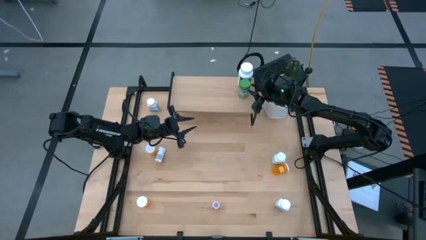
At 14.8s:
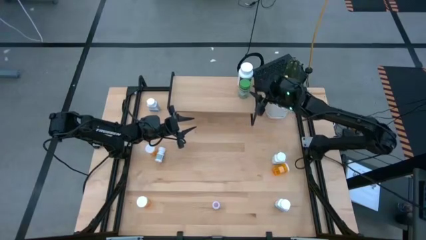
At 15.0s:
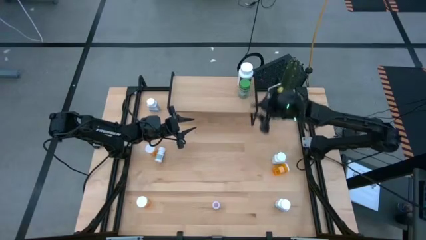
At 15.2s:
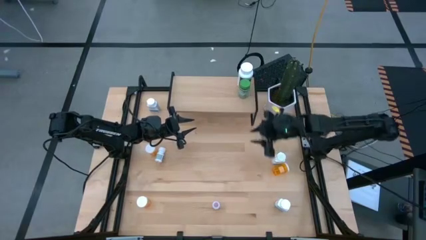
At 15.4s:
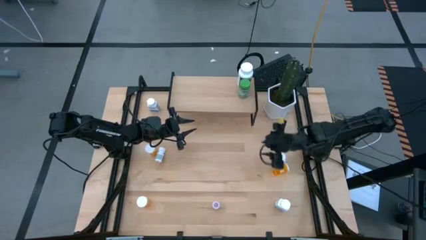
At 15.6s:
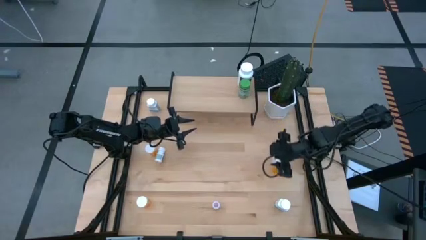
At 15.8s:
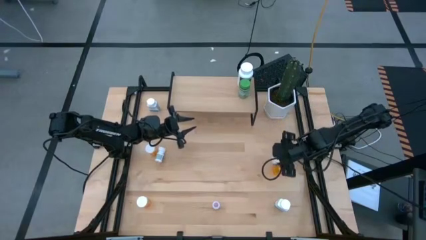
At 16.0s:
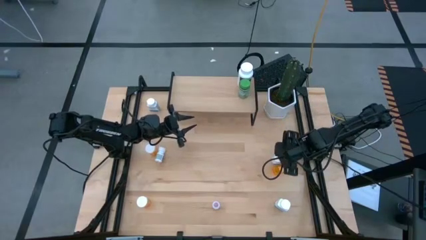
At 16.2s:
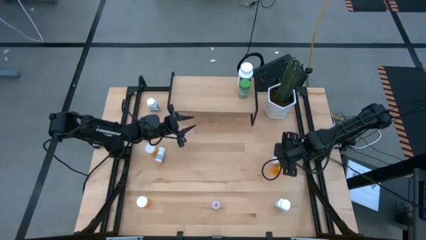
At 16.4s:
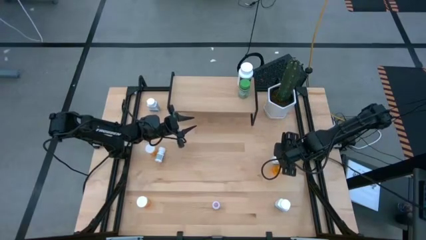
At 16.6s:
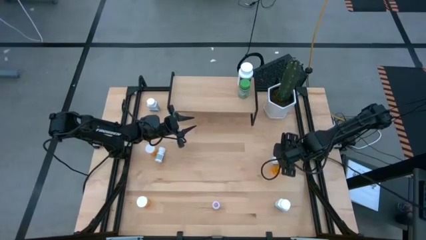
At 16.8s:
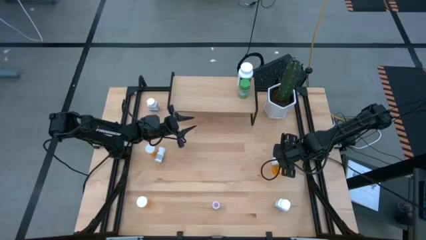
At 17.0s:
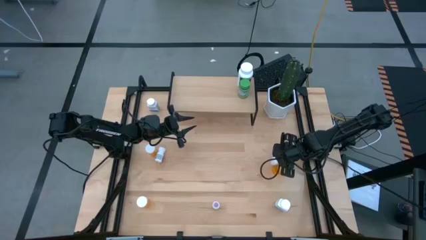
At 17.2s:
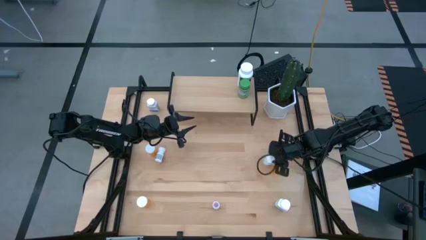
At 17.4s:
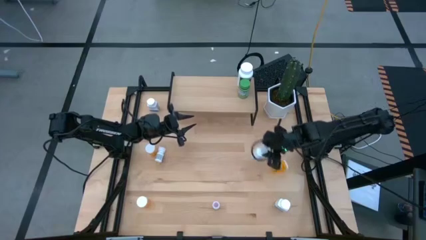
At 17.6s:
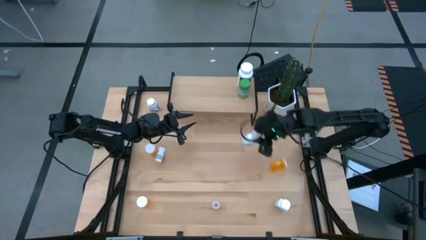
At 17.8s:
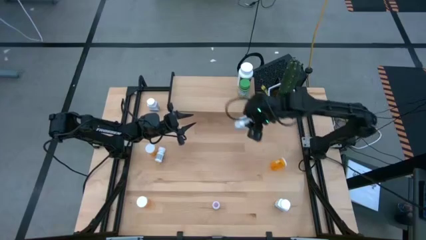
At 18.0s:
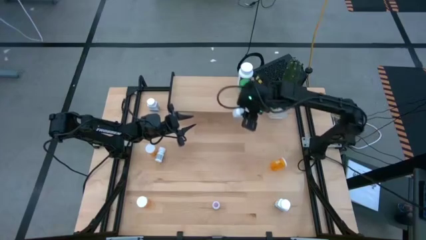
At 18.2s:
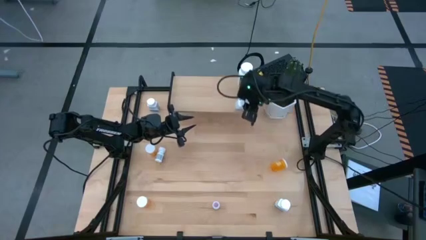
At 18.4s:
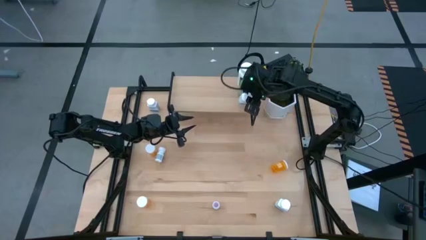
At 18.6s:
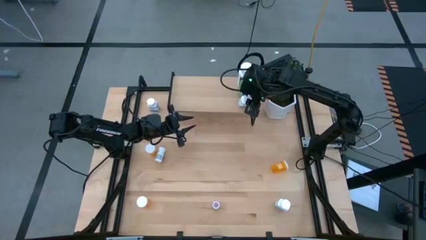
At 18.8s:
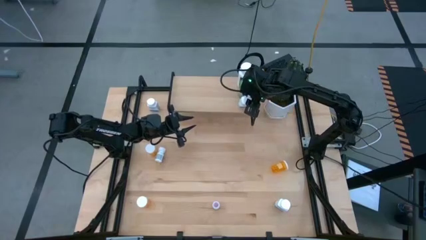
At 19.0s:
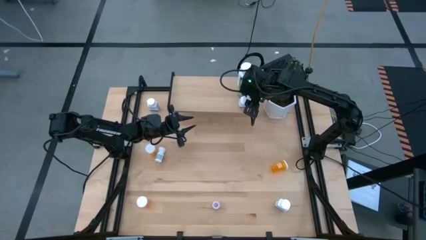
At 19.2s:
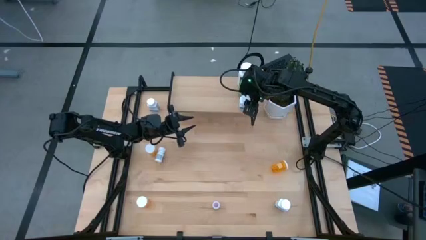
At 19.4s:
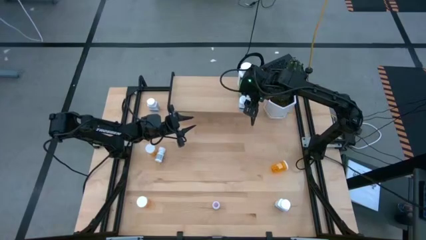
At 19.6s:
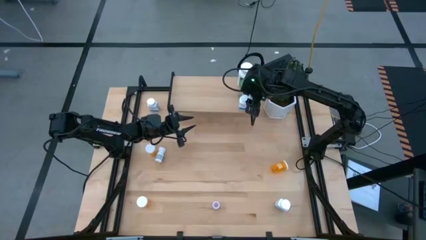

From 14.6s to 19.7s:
Task: Pick and place medicine bottles onto shelf by color
Put the middle right white blue pill bottle on the shelf

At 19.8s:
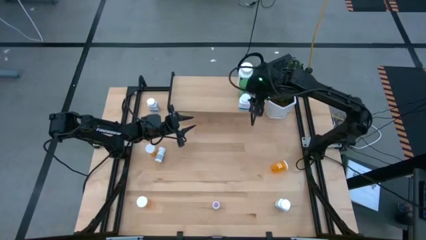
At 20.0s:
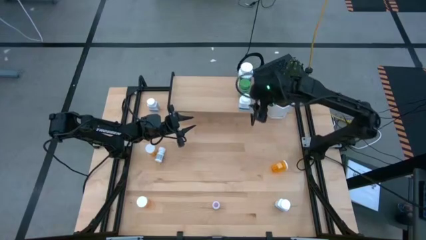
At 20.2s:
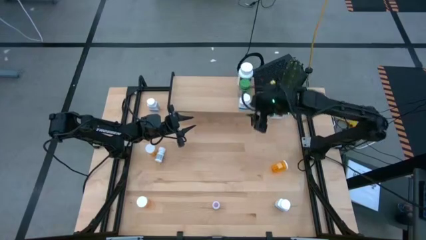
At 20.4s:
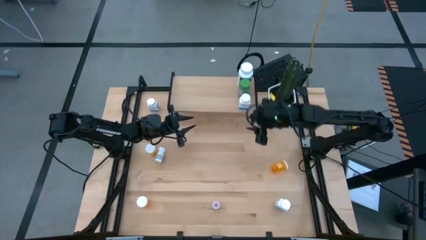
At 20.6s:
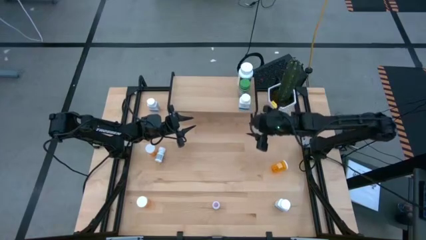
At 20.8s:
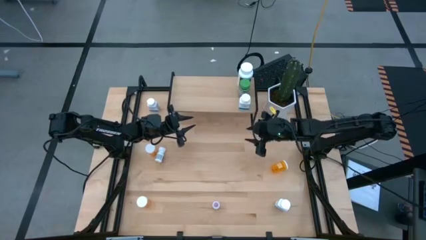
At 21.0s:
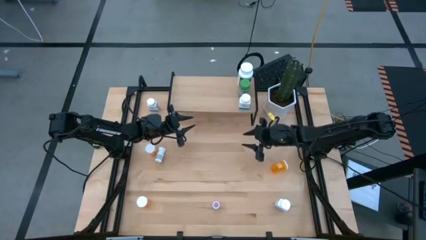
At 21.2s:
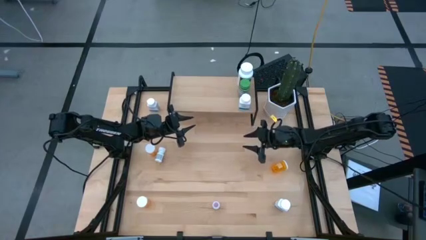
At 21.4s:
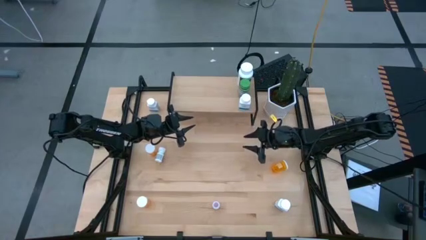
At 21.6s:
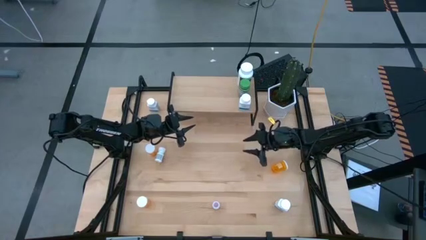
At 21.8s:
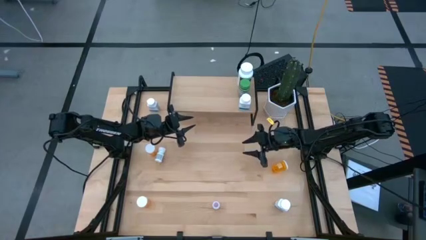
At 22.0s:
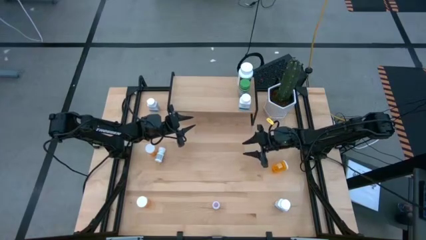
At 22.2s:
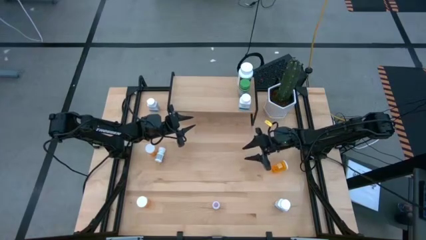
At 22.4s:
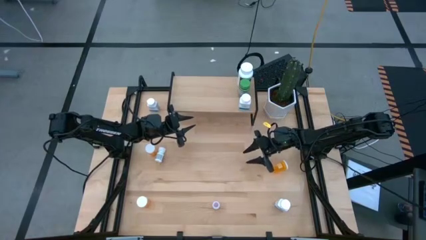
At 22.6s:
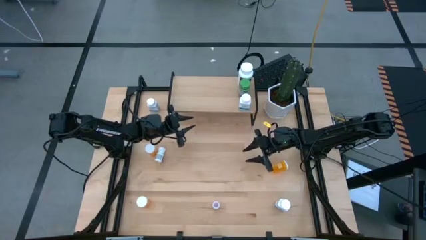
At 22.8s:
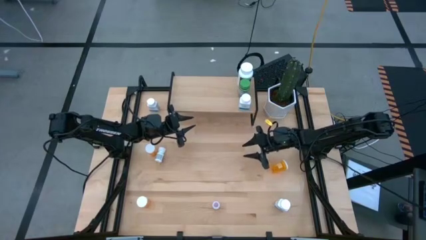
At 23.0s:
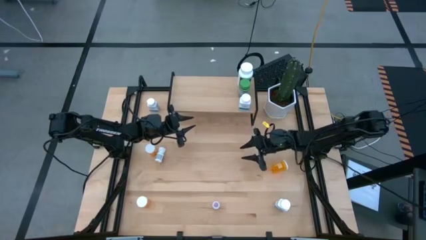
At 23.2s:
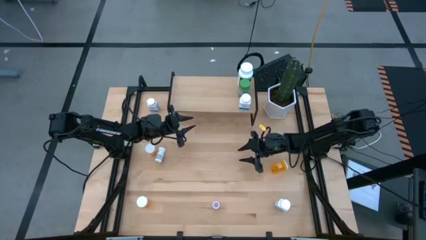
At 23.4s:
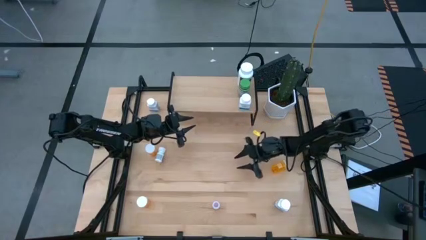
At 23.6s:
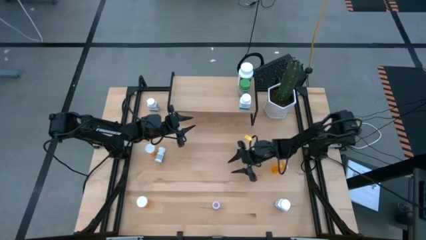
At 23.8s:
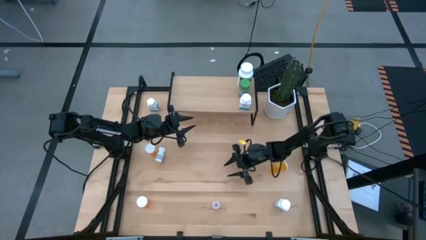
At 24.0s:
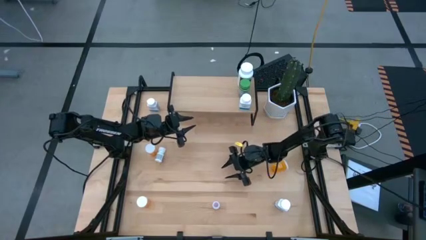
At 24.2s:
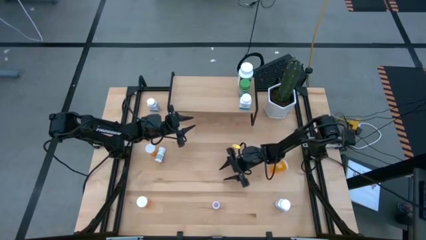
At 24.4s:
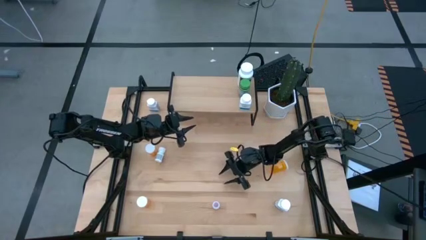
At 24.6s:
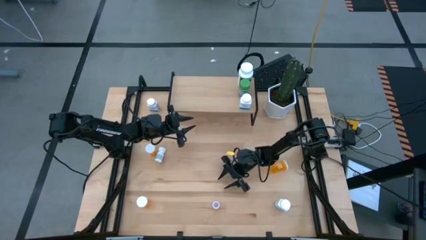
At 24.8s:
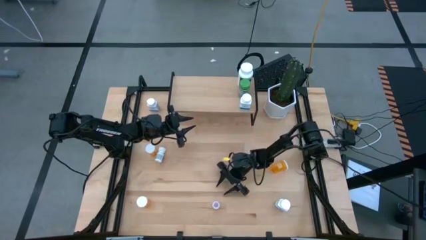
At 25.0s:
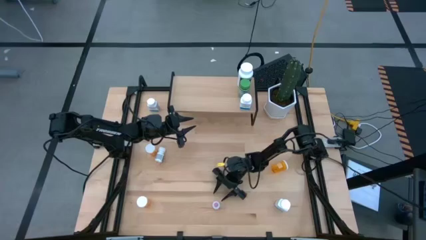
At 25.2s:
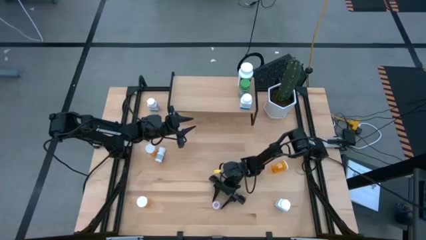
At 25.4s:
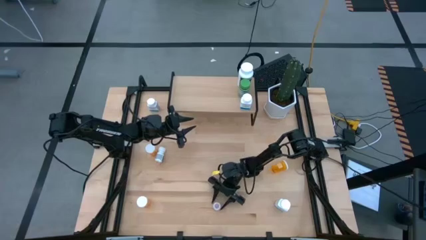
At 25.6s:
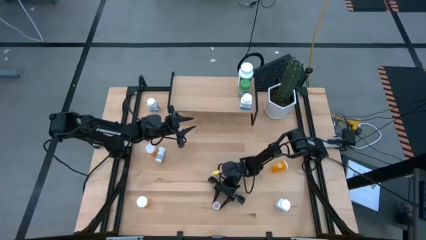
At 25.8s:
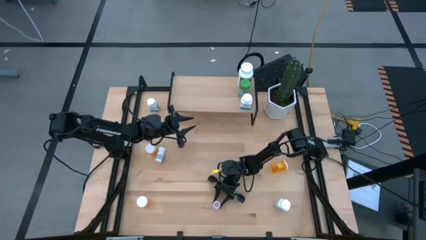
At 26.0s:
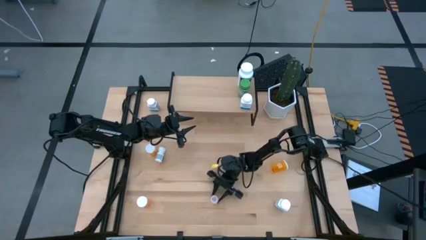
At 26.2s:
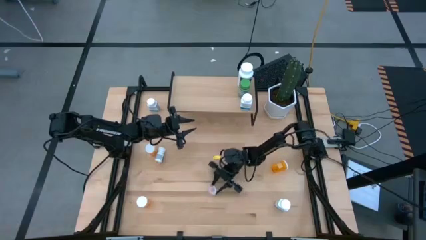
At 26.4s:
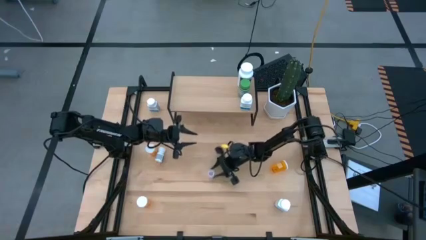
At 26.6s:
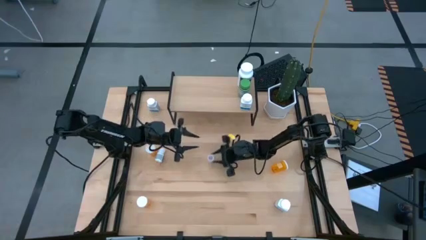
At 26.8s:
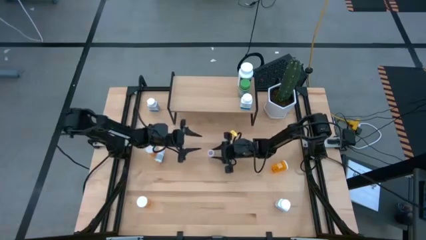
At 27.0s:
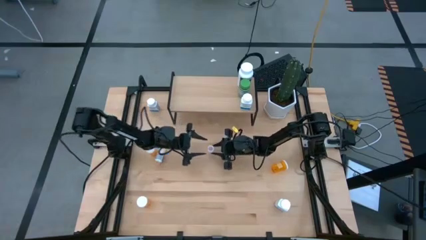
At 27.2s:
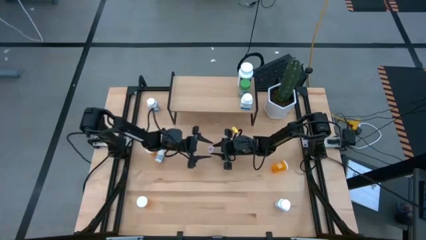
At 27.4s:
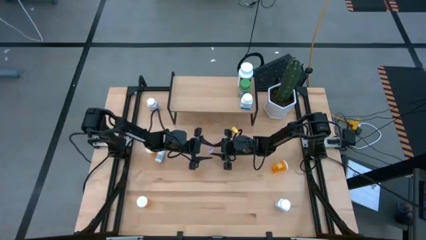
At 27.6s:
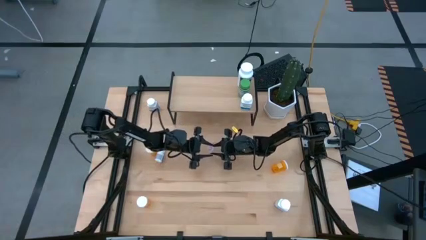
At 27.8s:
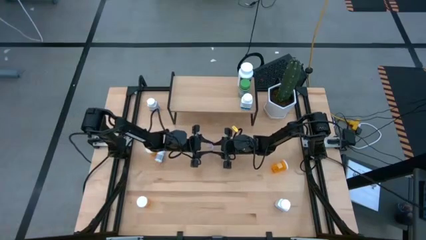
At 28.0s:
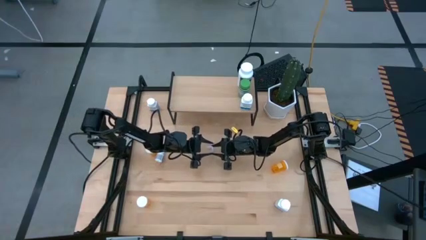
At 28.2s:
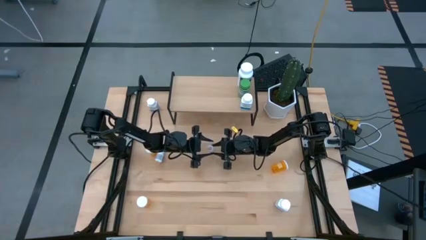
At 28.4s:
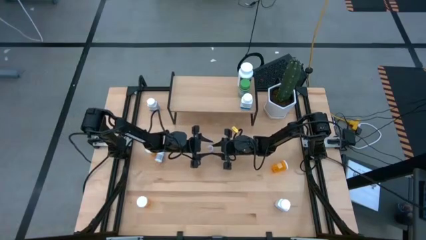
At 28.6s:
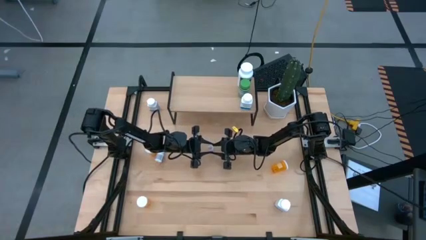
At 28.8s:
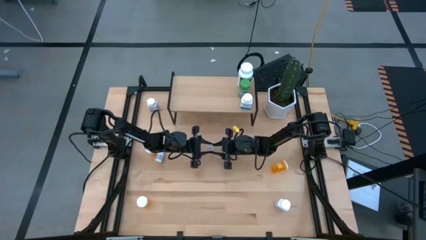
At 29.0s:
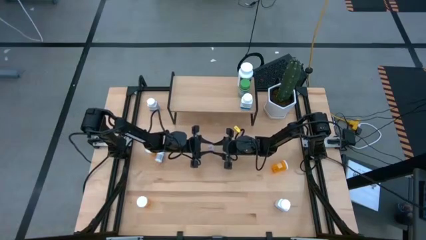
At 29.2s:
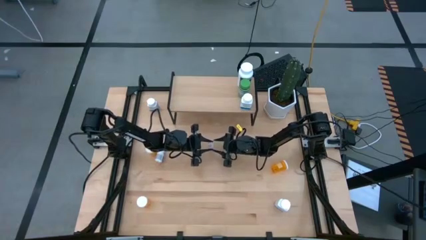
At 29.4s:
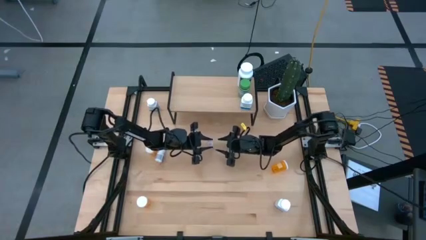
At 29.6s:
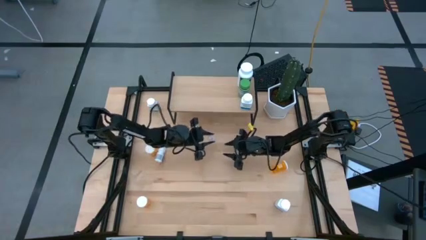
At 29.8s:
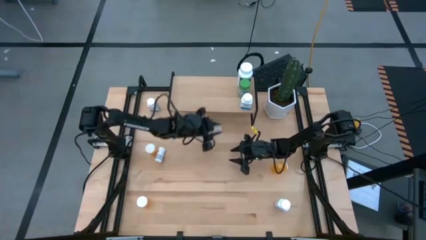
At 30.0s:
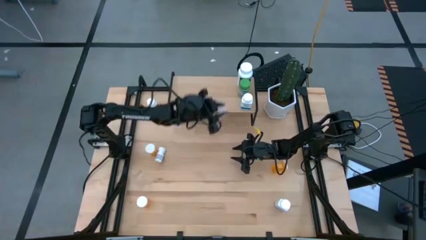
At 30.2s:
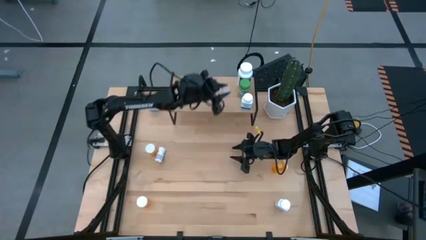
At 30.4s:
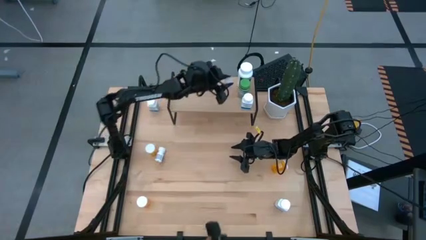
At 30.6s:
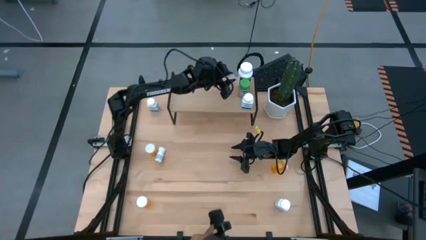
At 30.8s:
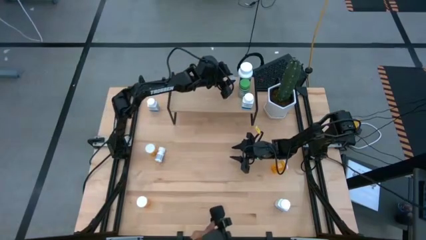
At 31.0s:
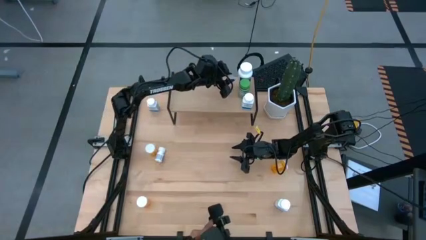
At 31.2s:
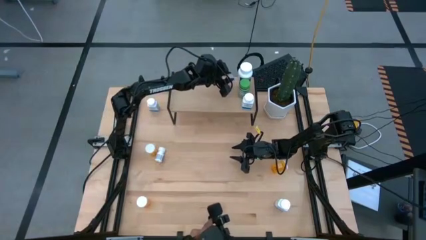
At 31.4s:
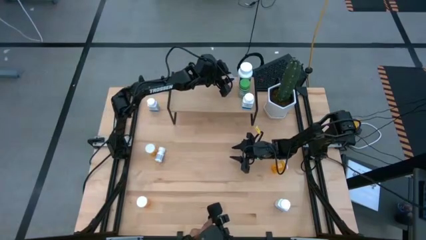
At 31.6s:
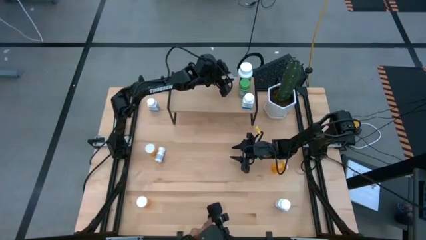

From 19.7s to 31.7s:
Put the transparent pill bottle on the shelf
